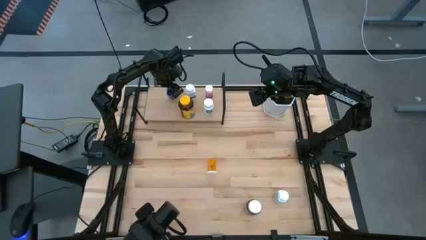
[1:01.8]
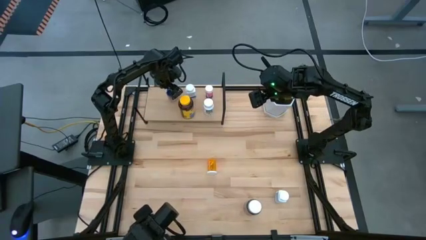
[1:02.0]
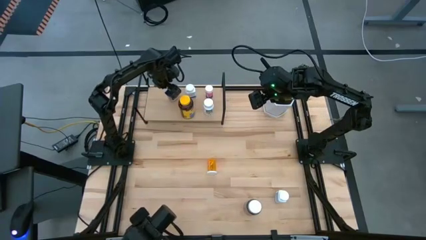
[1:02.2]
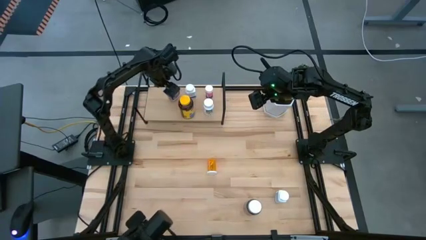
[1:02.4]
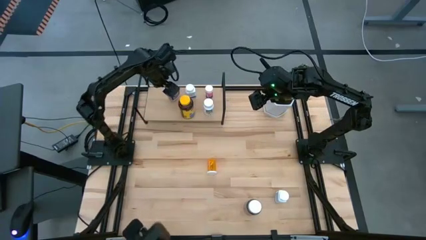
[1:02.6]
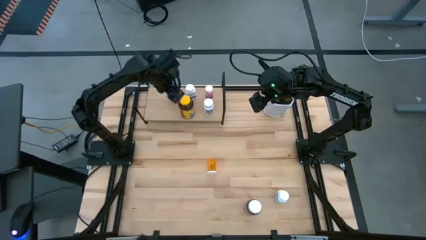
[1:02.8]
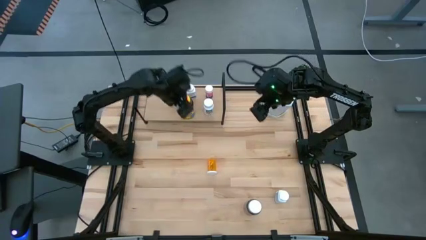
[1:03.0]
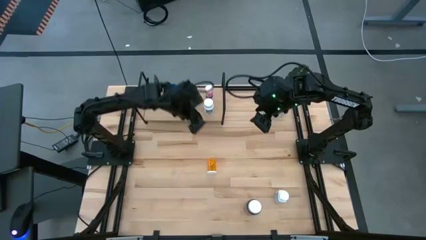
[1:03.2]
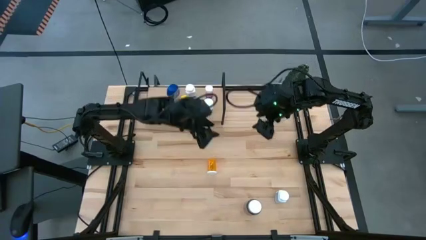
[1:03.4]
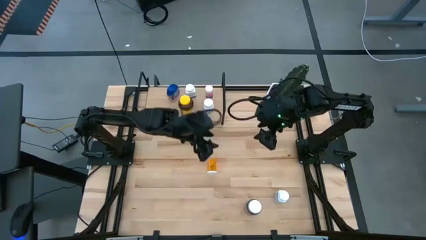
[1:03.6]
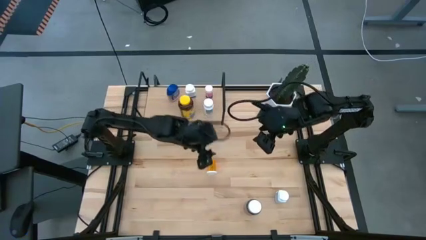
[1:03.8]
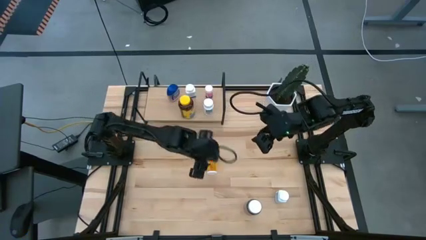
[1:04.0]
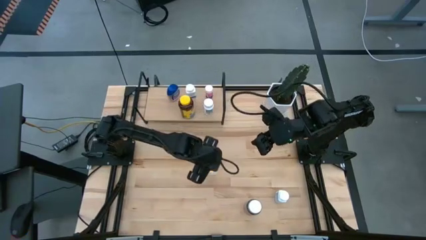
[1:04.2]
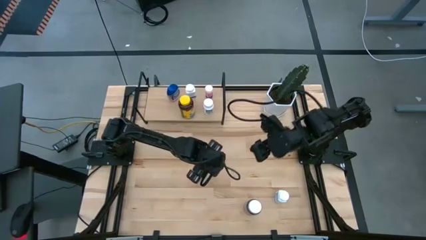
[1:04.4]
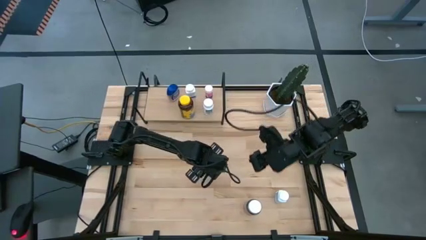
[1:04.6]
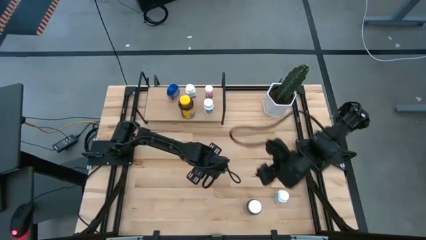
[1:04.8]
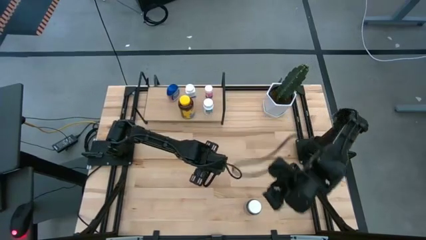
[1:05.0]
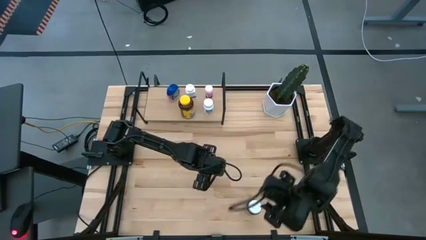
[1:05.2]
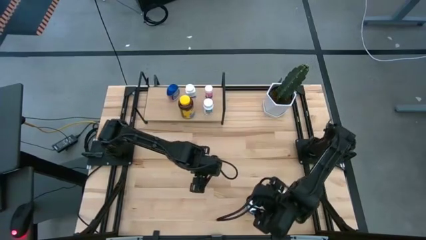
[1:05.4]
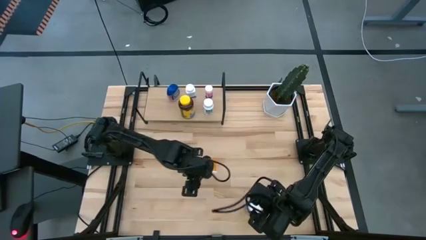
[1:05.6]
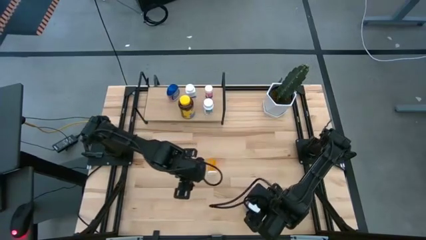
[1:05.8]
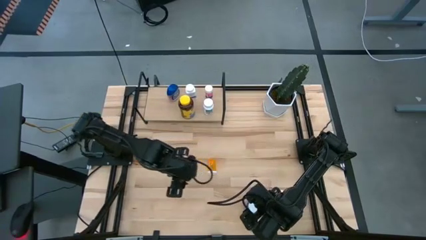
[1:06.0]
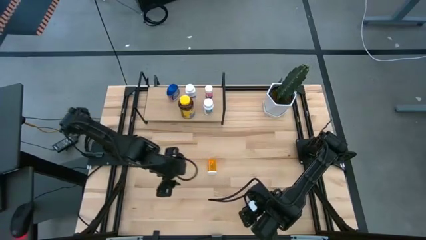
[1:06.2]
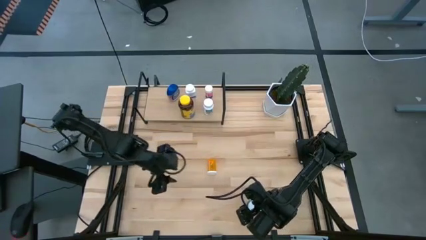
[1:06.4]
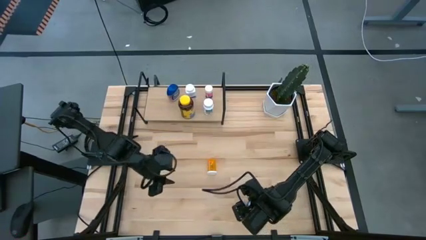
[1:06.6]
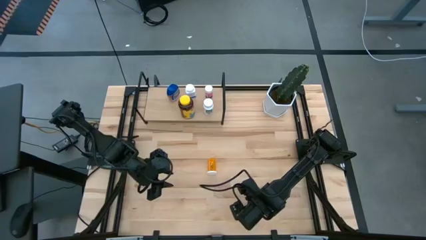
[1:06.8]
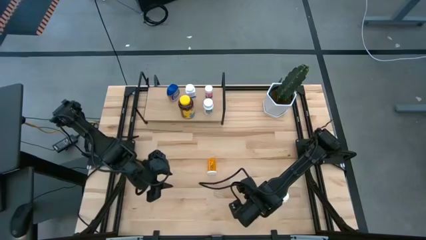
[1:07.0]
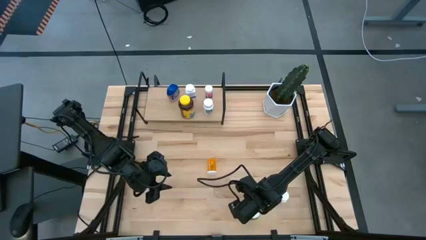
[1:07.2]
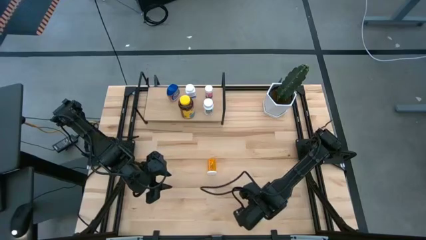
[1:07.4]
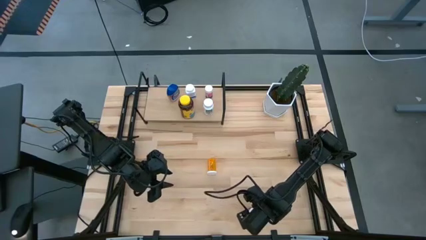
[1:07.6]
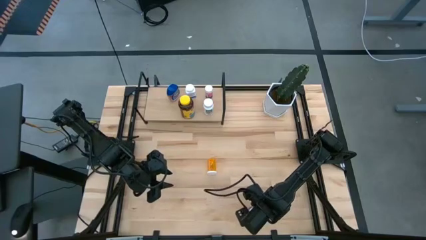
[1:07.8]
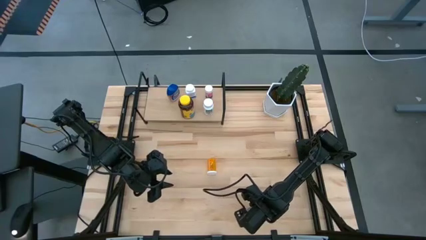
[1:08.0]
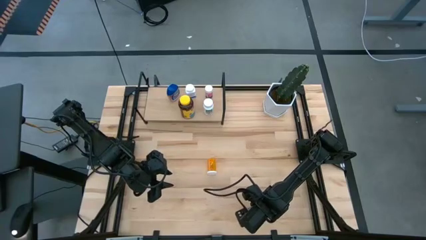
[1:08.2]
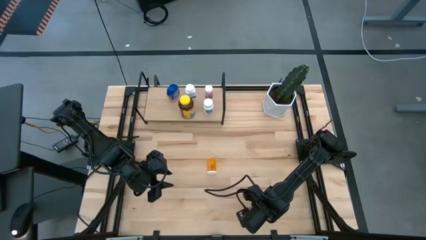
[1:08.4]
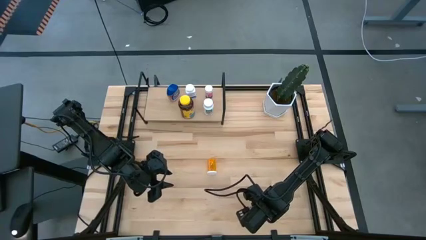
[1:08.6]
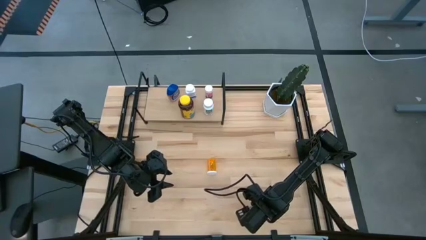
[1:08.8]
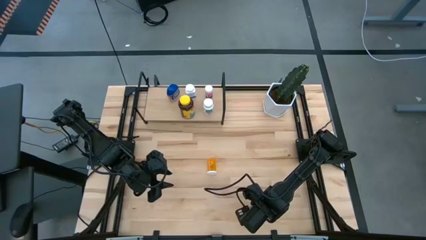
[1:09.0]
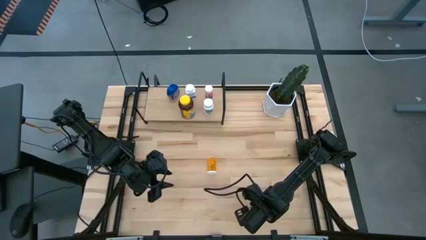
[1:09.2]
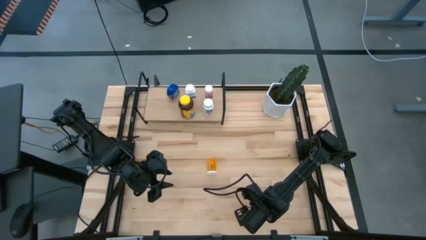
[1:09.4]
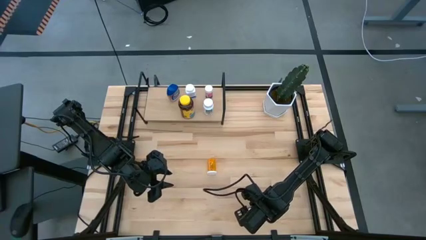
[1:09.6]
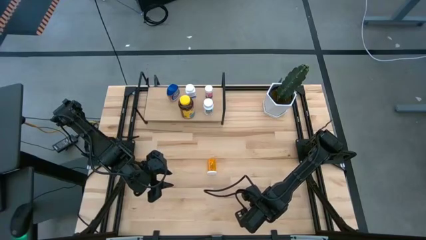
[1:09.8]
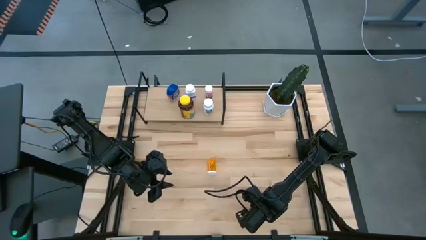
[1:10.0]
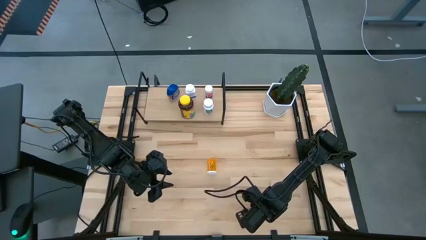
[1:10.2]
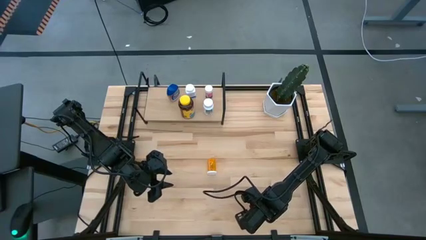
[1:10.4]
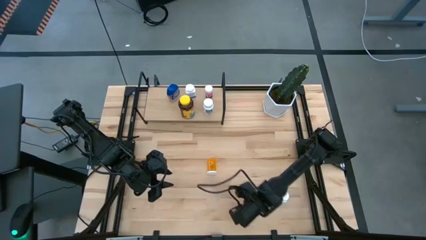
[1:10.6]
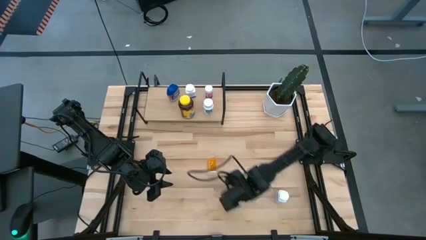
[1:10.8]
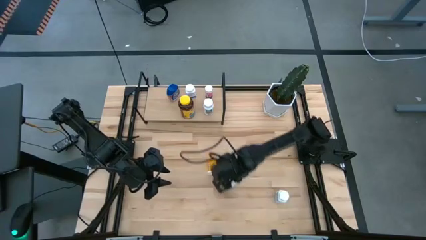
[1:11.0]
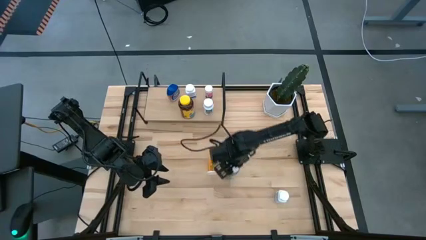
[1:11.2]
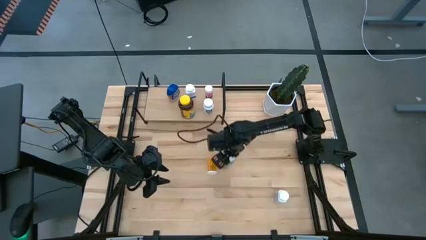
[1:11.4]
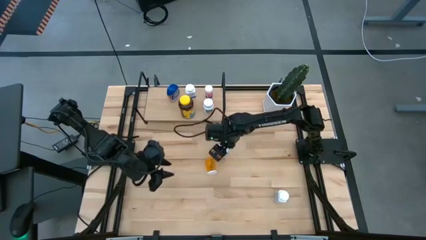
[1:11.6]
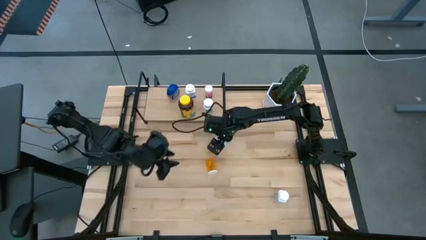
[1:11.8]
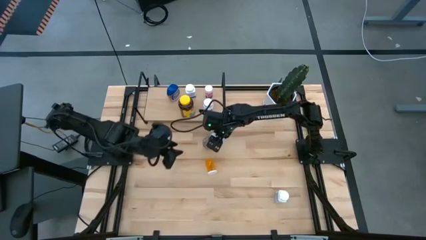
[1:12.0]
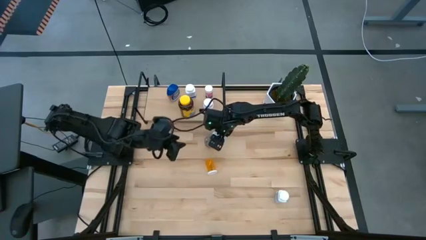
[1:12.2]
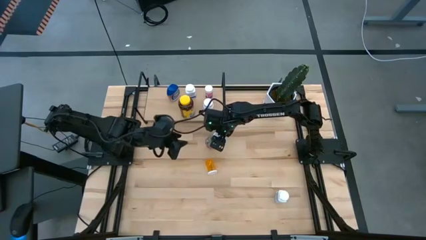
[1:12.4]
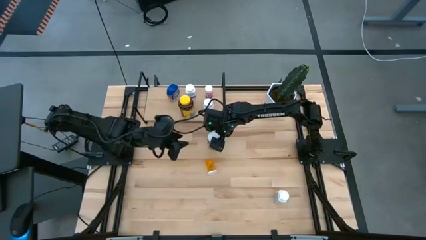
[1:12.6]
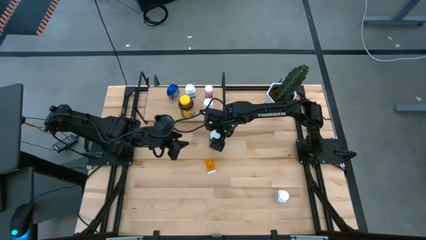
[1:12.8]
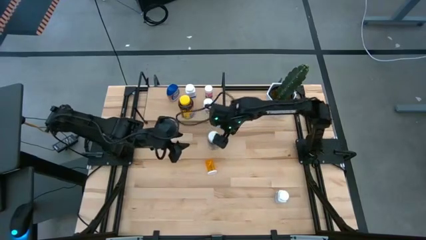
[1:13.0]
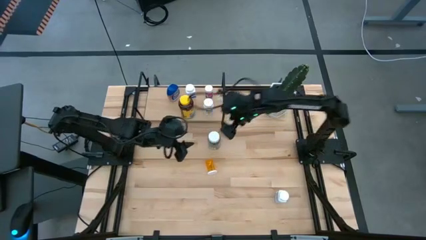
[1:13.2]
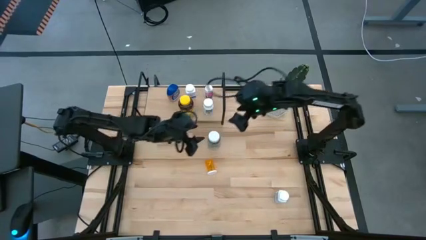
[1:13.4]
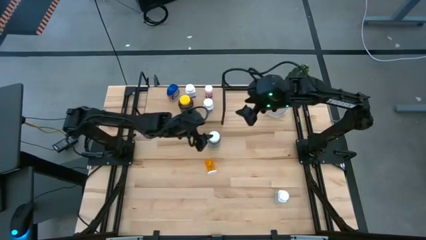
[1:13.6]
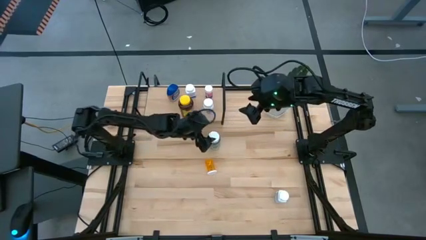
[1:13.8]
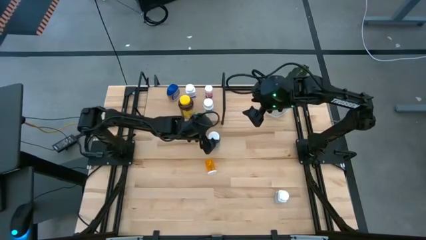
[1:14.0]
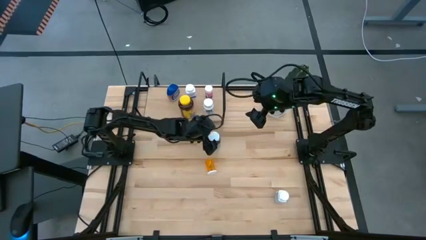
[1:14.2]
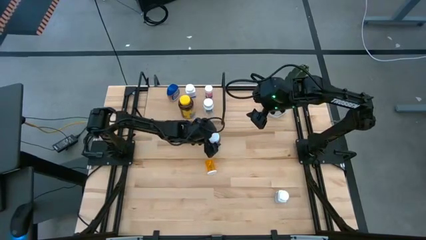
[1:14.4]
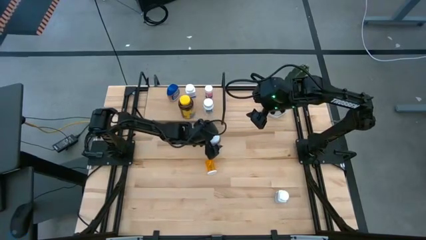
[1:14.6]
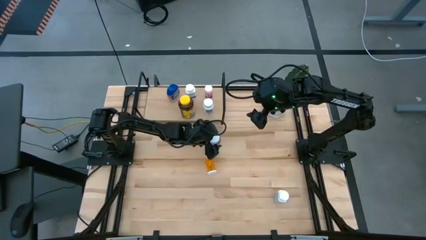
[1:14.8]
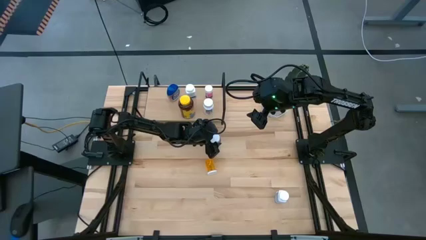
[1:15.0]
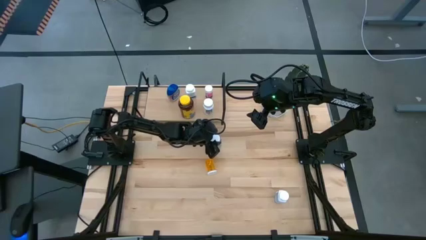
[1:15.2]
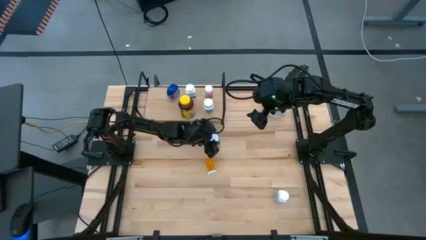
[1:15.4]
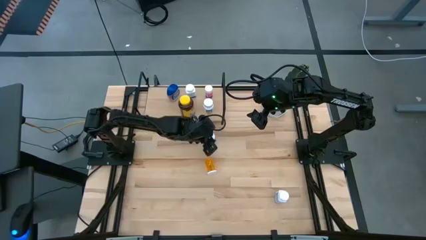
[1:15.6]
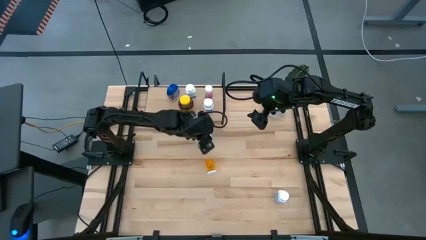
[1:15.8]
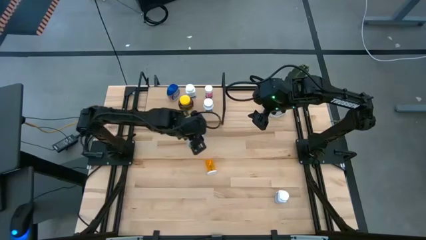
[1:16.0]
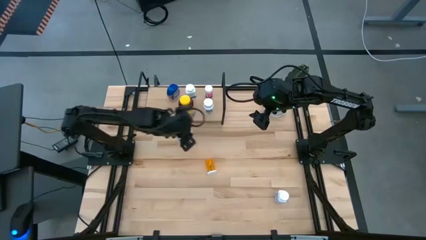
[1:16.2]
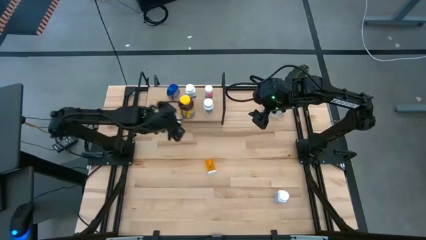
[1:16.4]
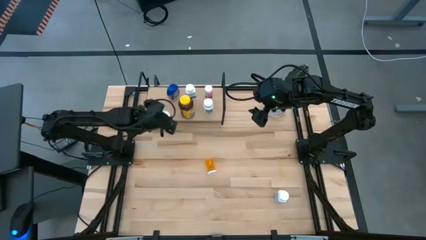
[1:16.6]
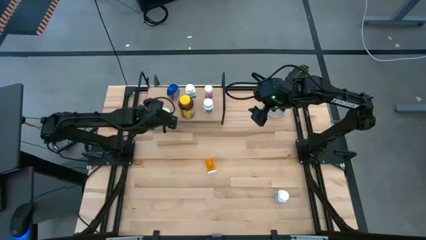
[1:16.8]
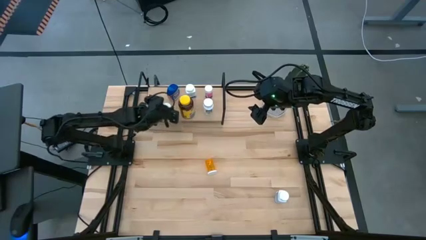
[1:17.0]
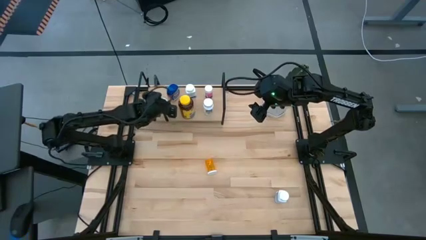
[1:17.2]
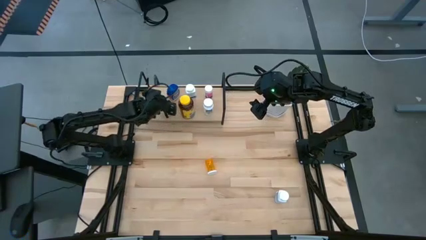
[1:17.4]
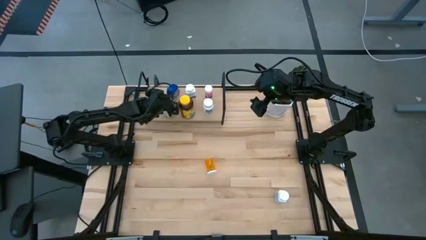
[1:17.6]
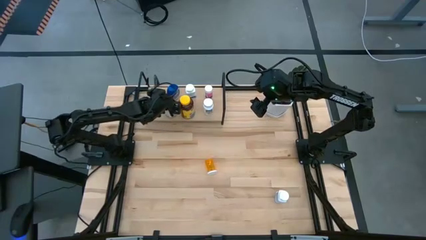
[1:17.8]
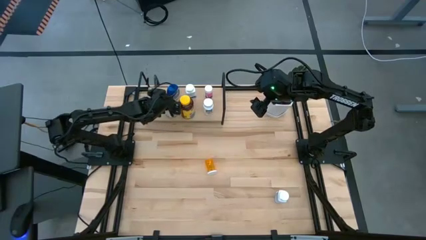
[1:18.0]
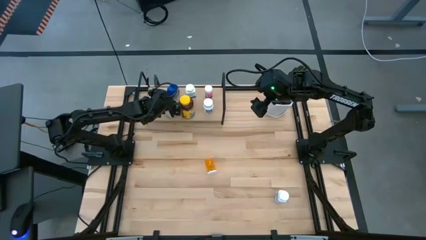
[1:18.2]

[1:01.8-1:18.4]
Task: Pick and place medicine bottles onto shelf by color
Put the clear pill bottle with white cover on the shelf
